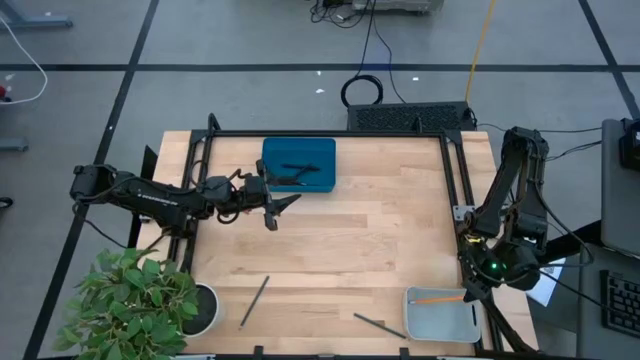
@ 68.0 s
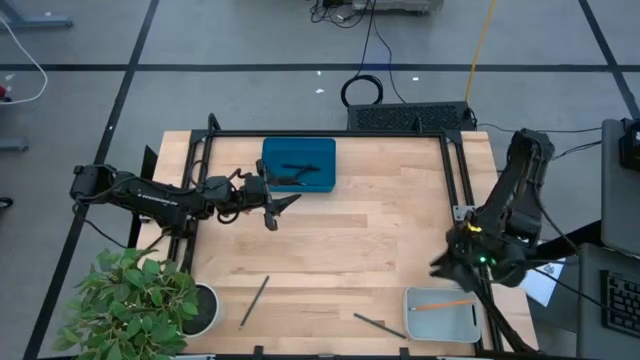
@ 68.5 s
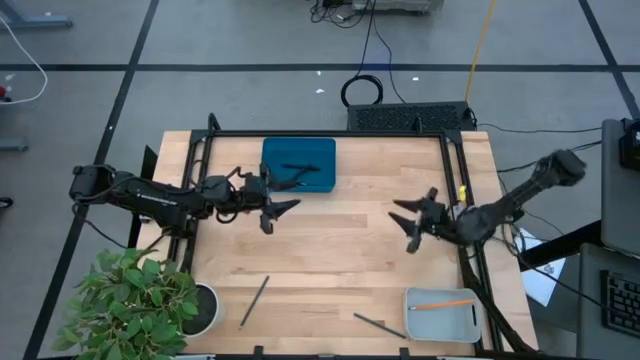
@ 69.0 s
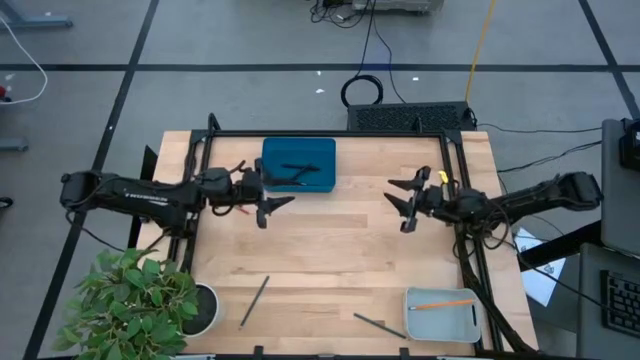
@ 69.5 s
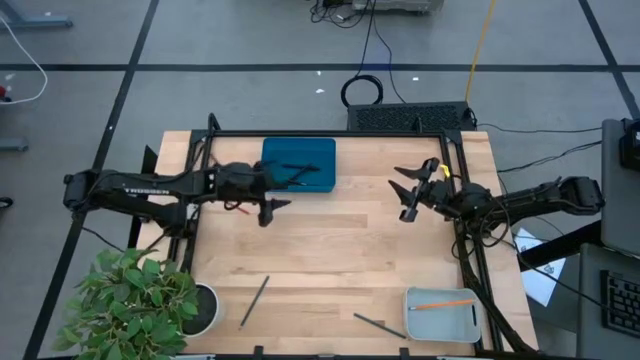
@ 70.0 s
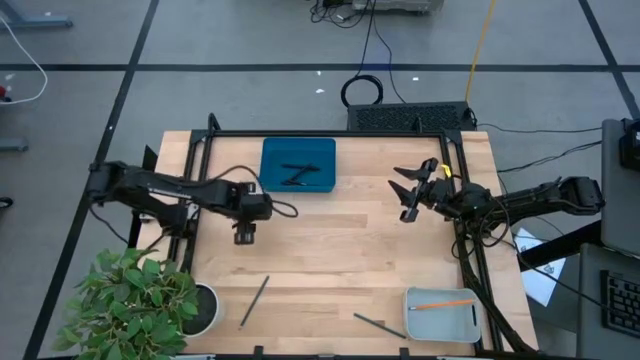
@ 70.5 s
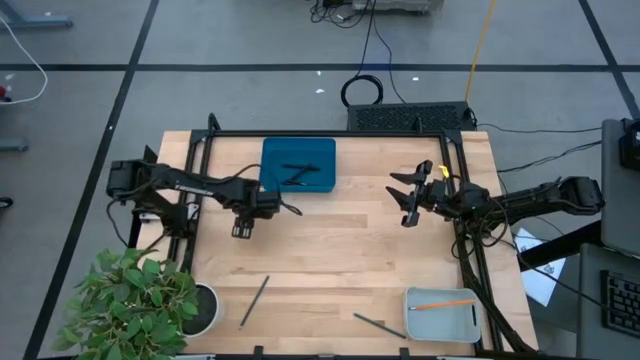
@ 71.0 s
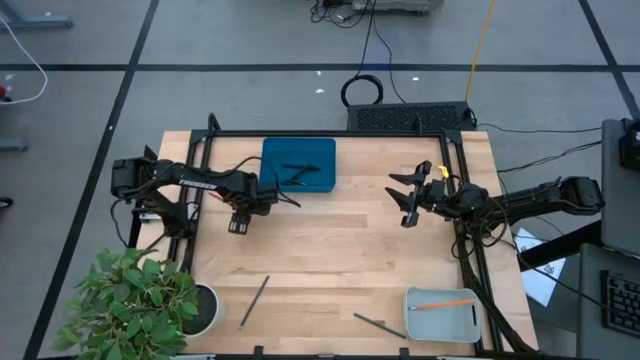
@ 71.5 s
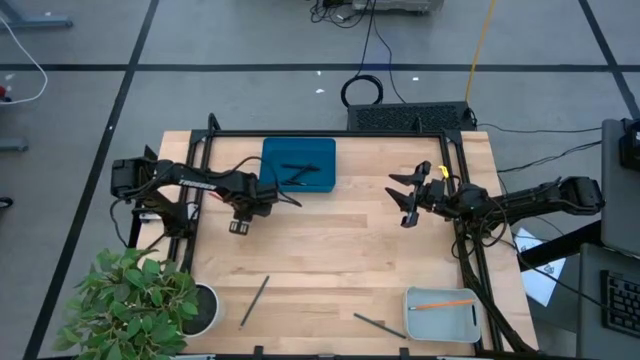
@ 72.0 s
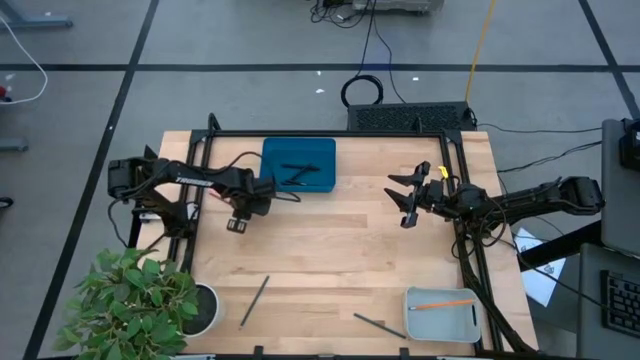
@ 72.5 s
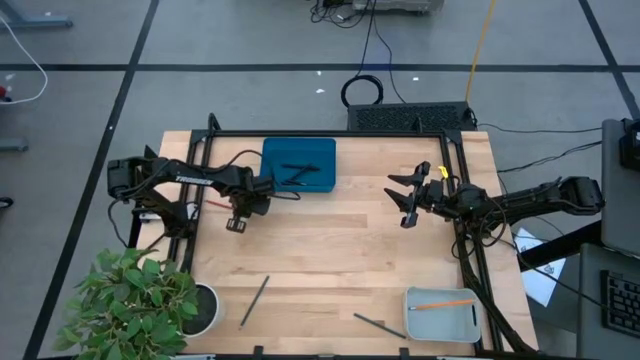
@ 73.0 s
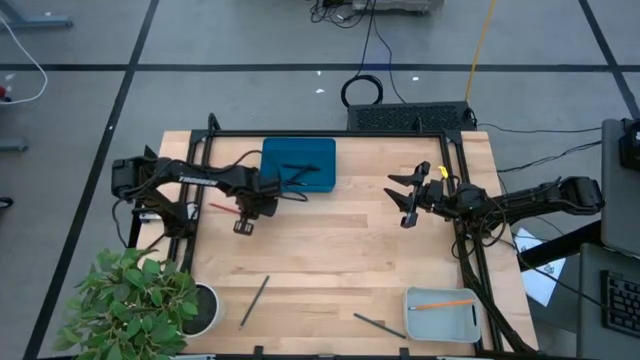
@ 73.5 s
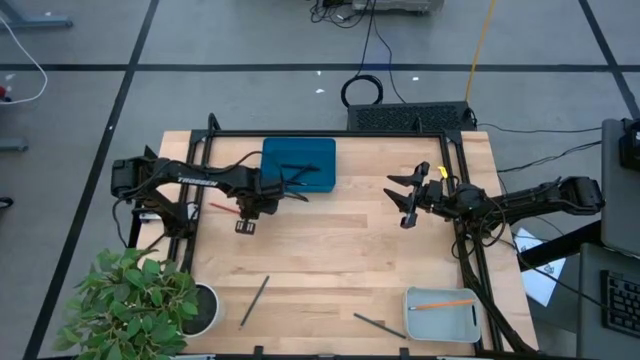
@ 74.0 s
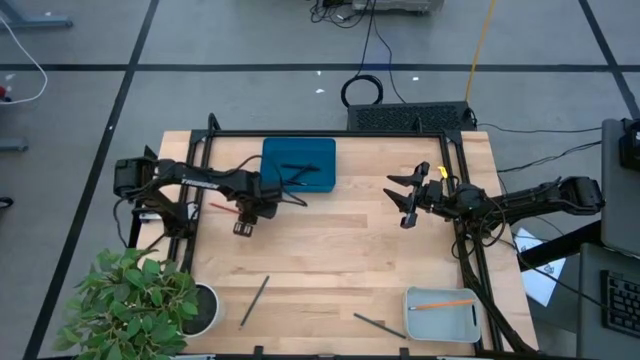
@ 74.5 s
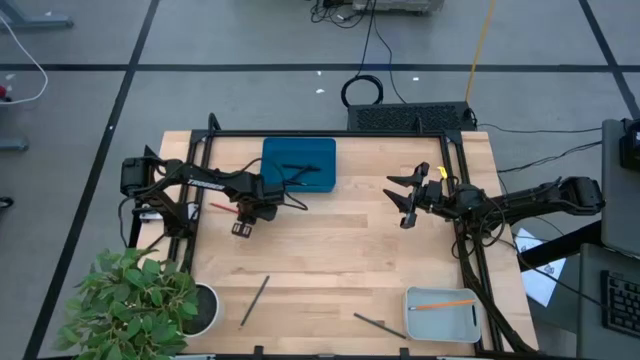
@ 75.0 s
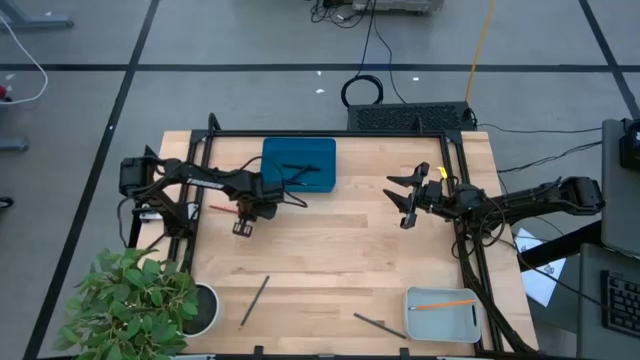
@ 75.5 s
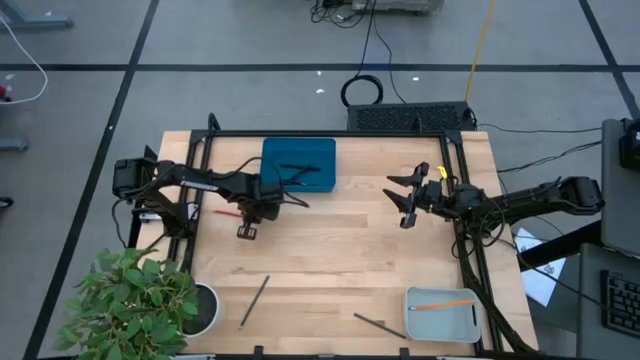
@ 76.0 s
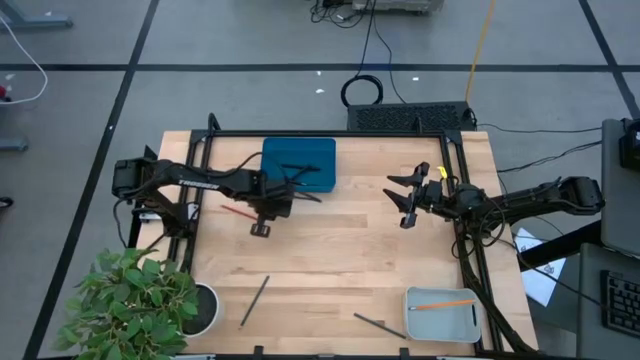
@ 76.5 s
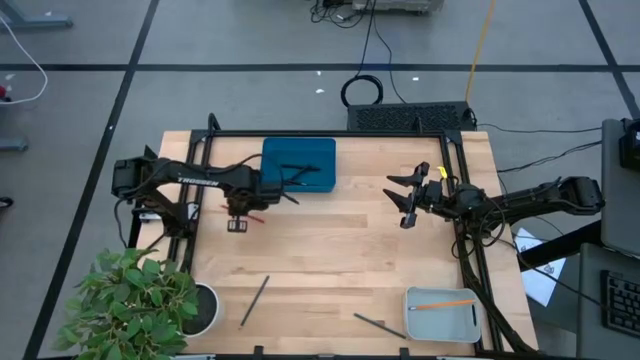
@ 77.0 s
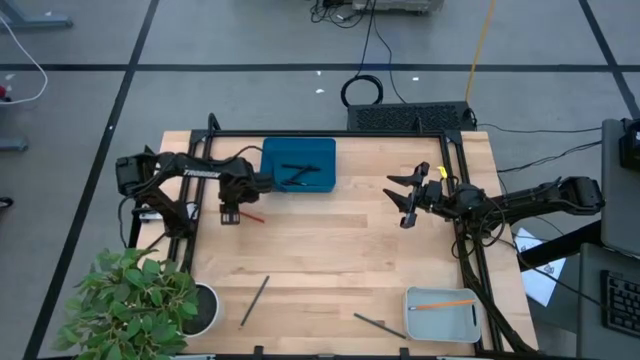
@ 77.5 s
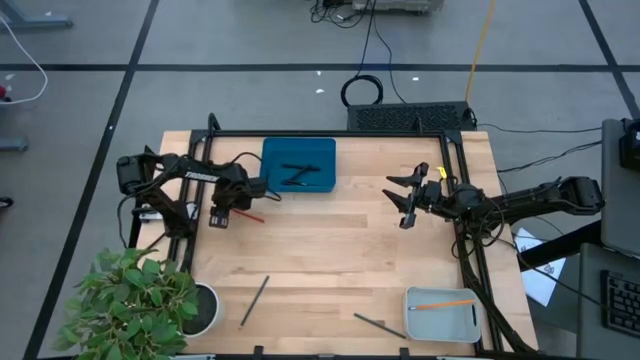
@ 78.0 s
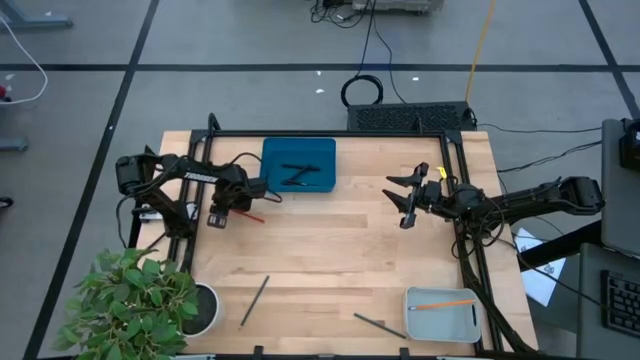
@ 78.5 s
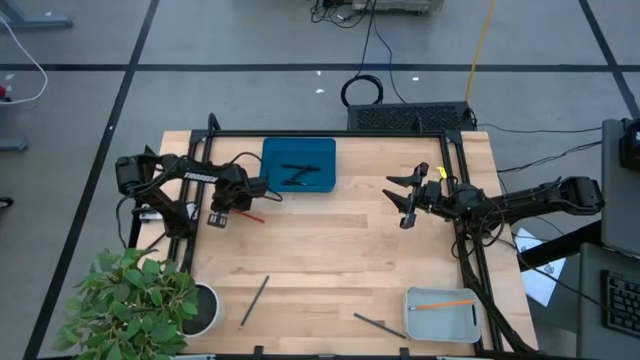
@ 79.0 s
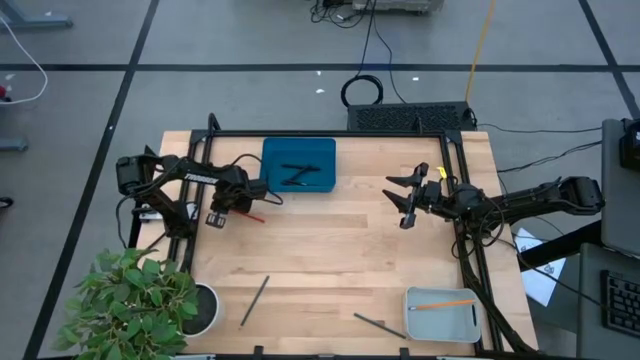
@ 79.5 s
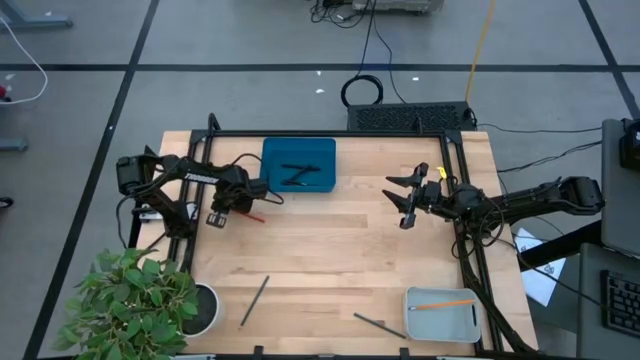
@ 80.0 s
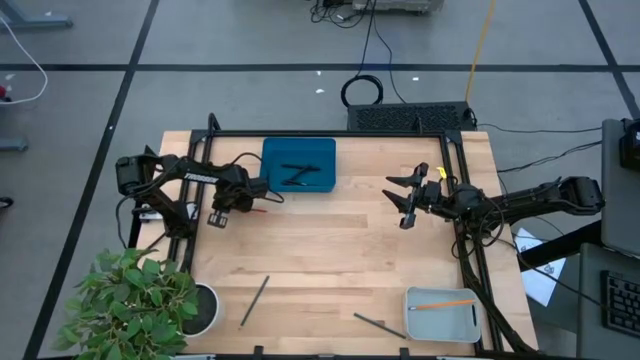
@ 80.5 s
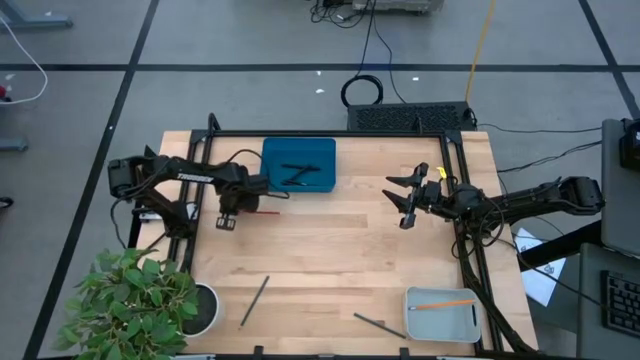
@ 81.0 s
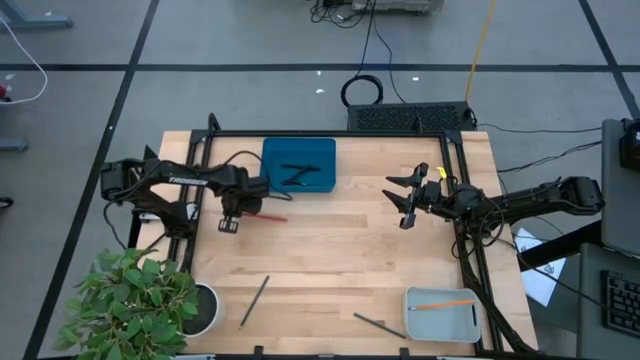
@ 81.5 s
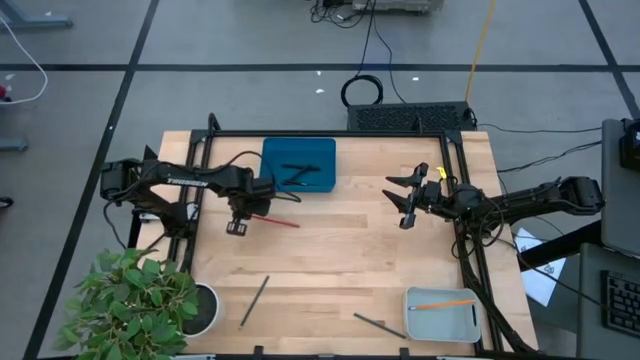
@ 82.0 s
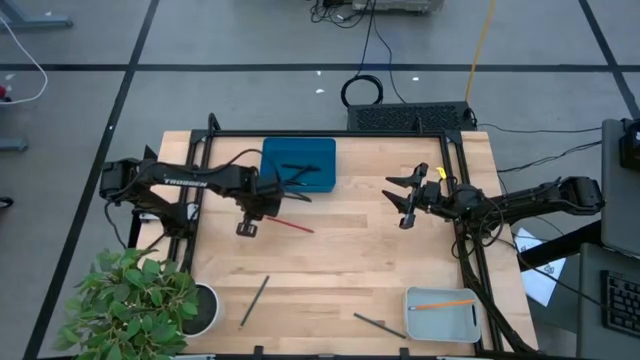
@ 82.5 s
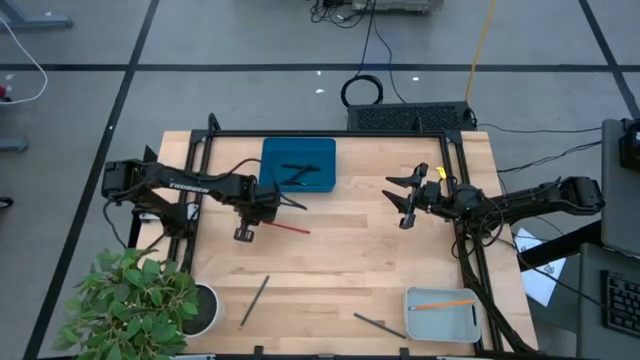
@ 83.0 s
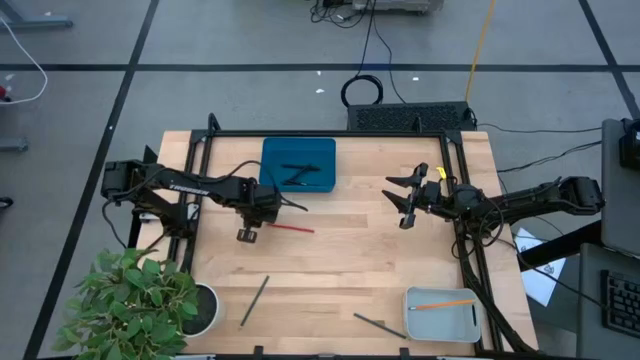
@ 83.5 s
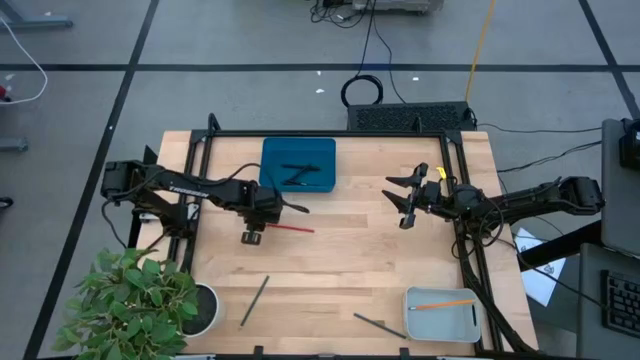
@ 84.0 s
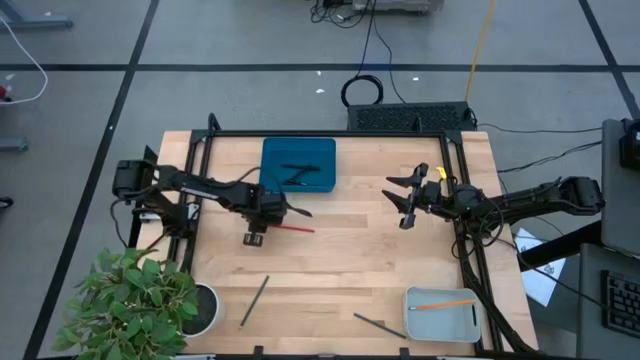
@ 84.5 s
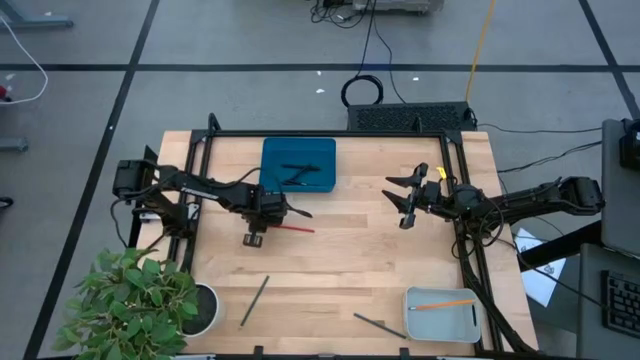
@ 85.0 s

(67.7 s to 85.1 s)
Task: Sort pens & pencils
Put the red pencil into the gray bin

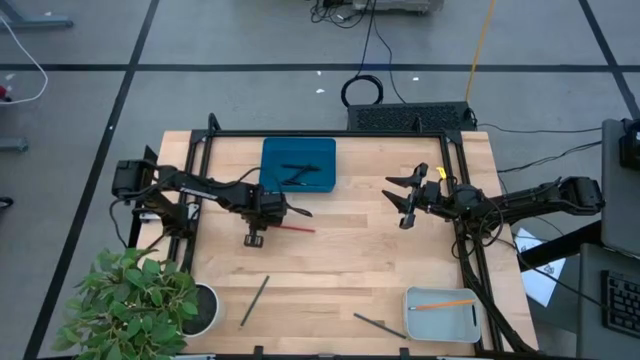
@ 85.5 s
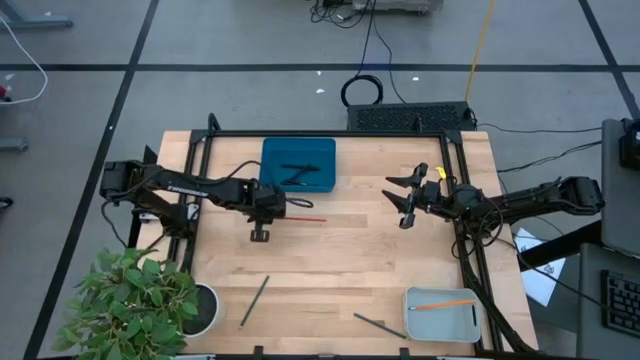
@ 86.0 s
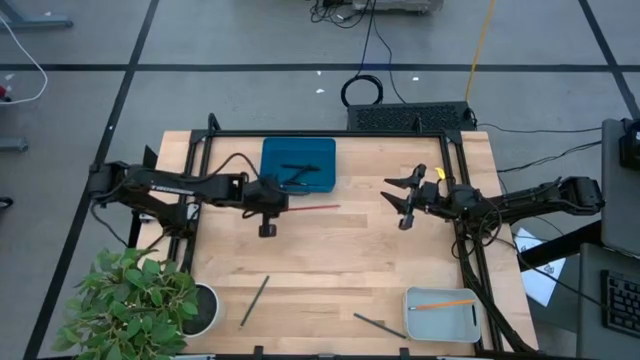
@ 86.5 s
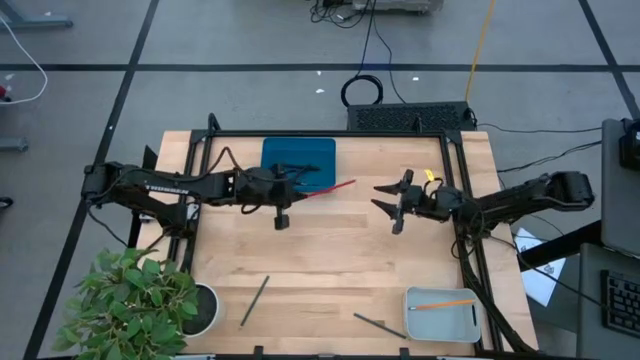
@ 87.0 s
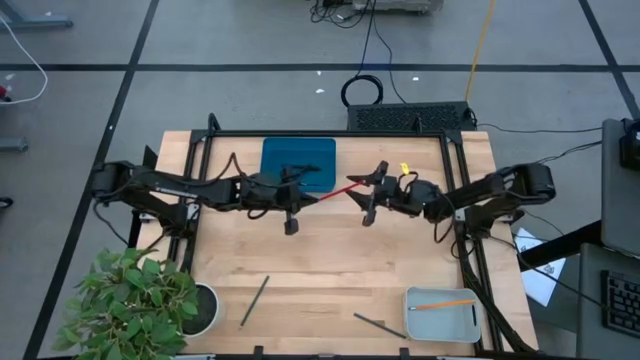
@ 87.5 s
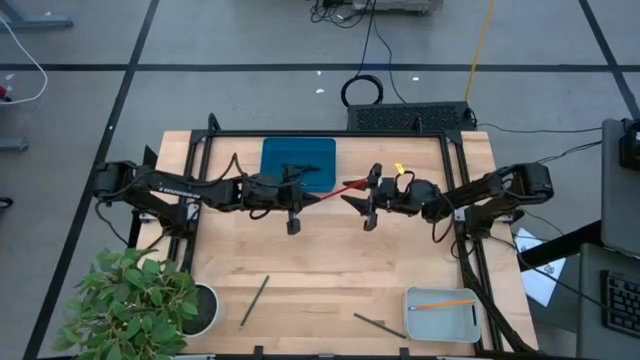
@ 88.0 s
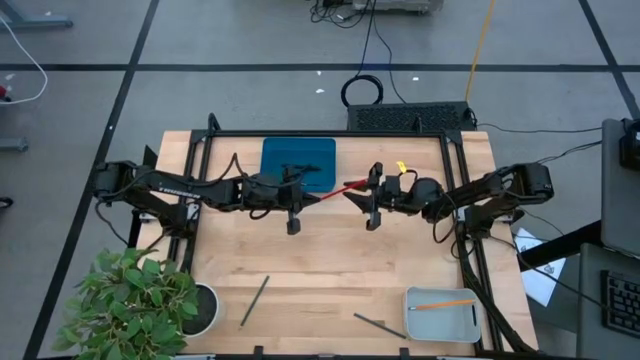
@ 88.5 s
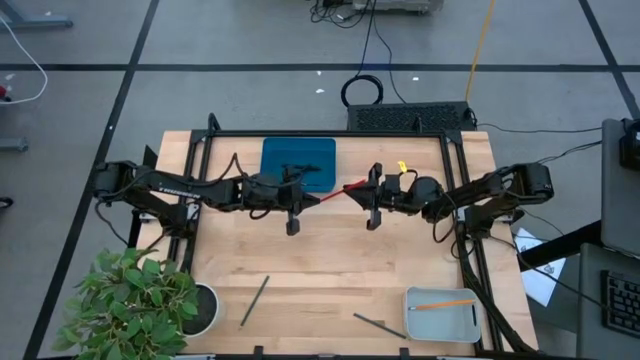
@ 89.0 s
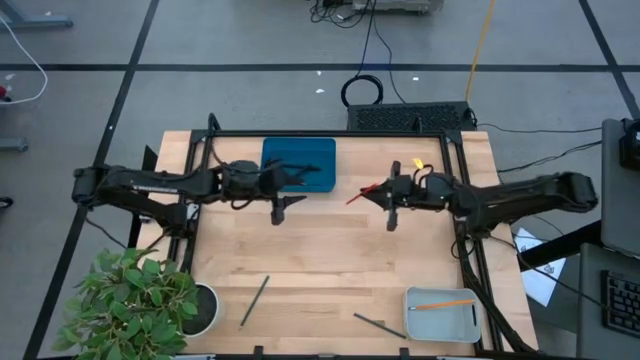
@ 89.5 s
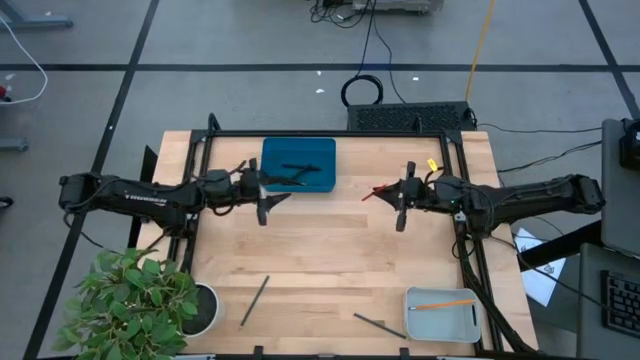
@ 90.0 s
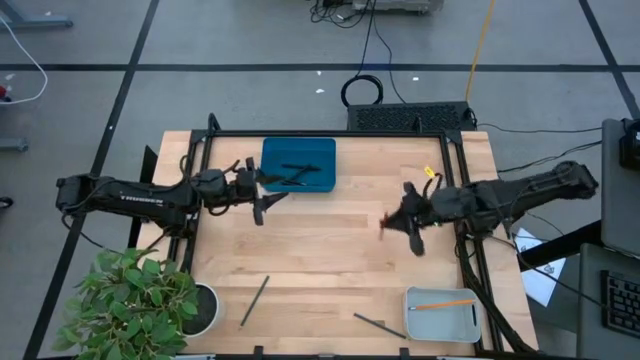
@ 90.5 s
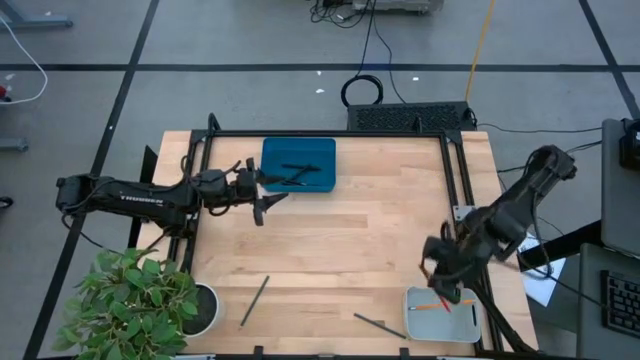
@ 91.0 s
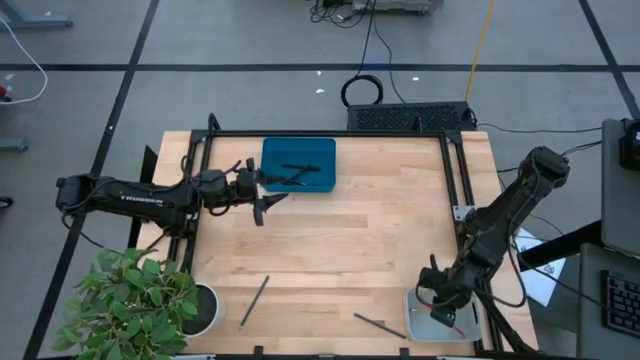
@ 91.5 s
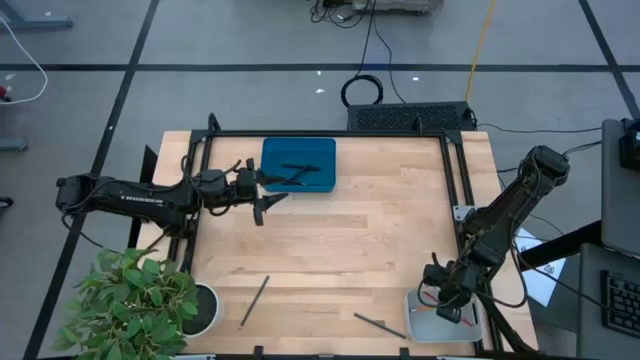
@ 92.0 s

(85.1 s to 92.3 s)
Put the red pencil into the gray bin
